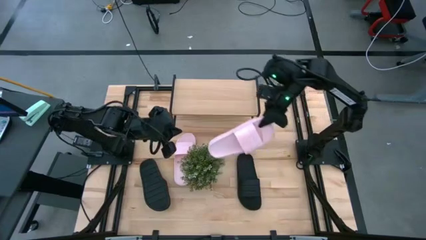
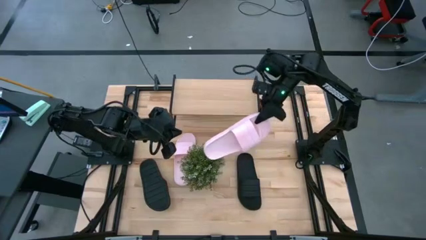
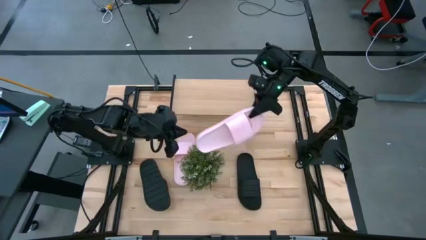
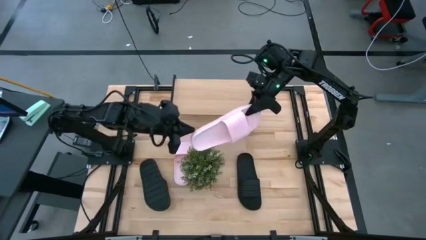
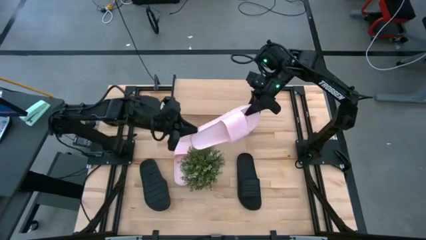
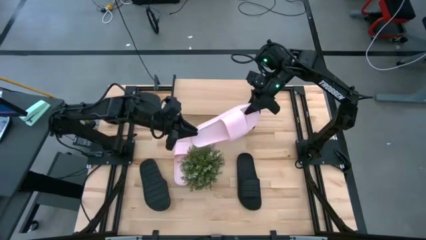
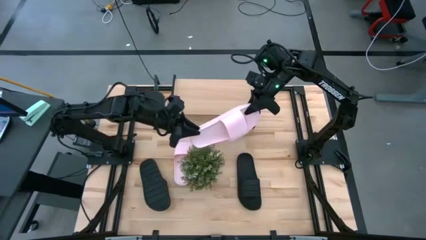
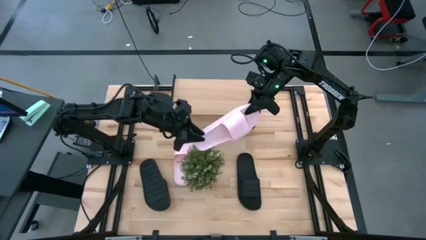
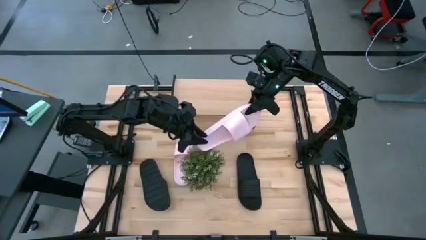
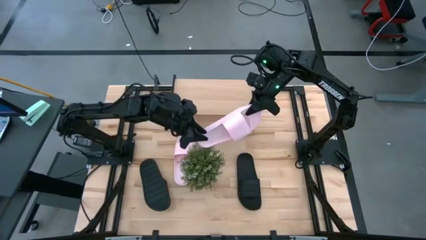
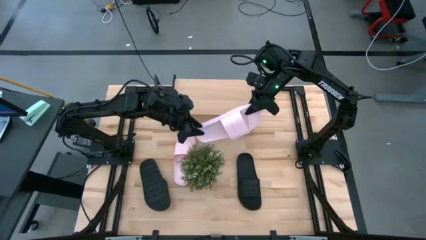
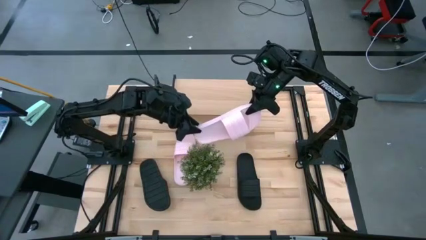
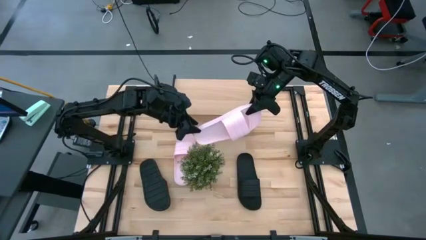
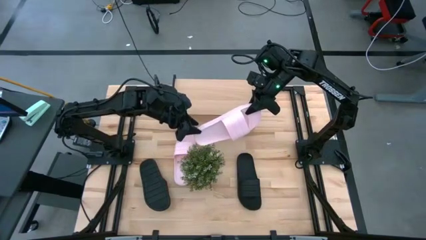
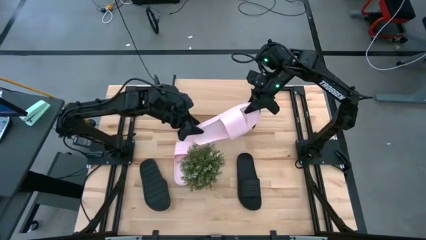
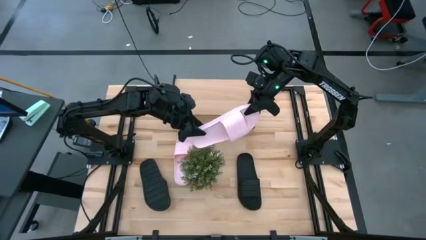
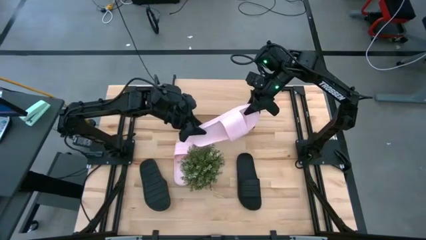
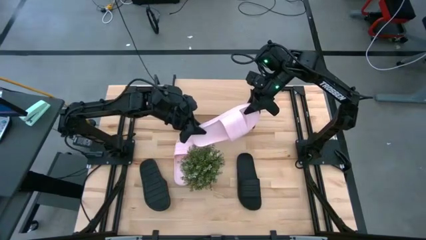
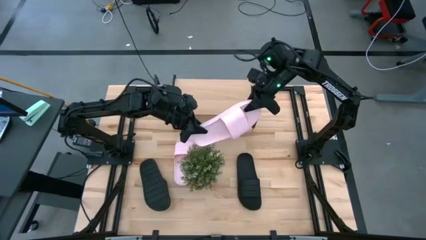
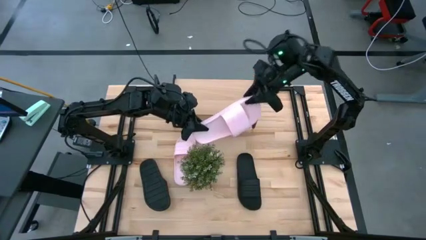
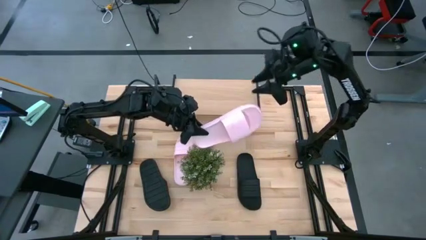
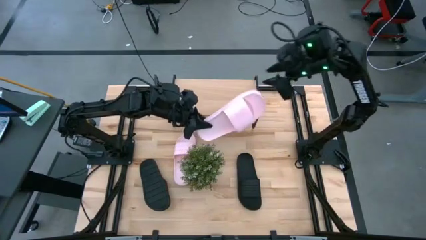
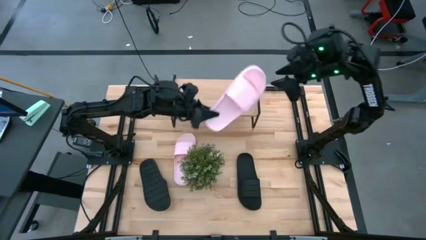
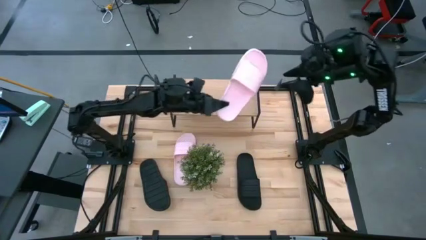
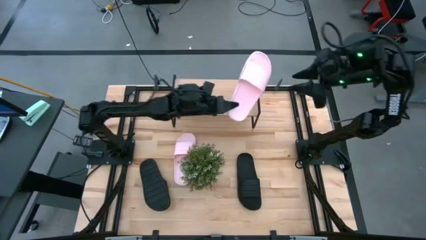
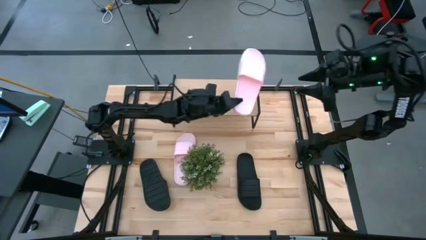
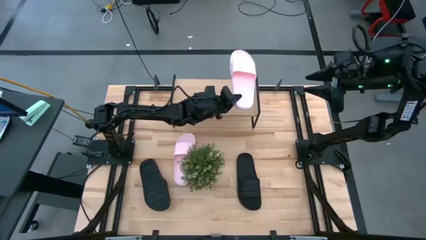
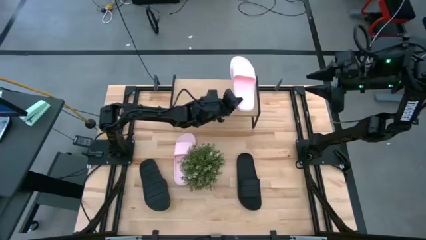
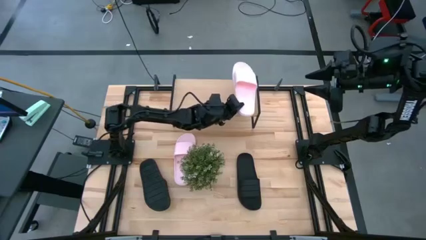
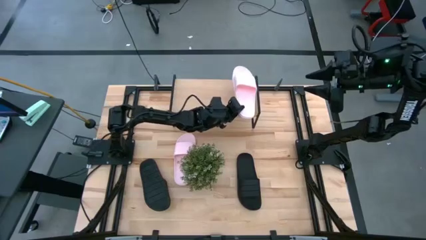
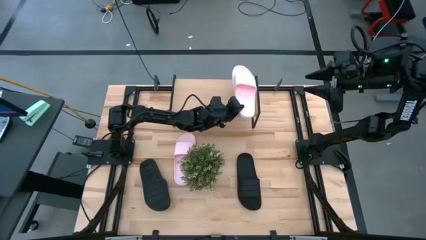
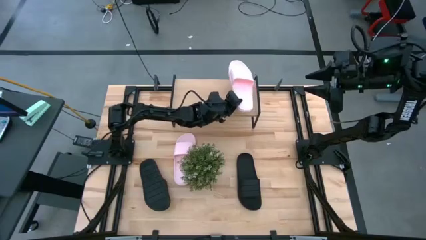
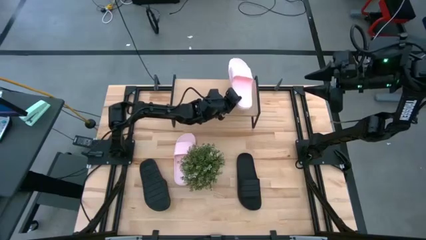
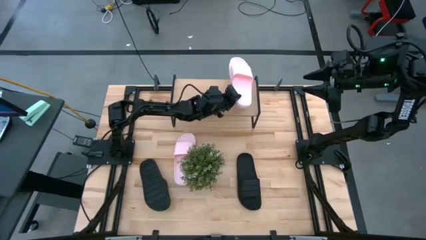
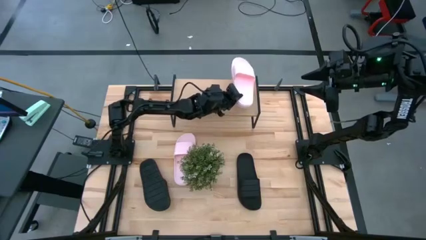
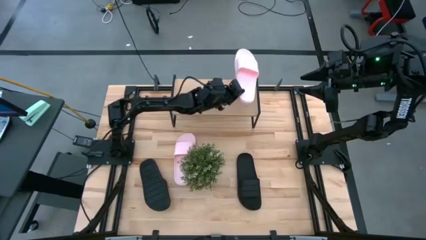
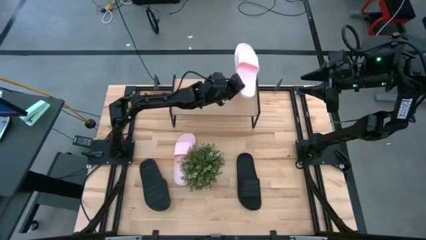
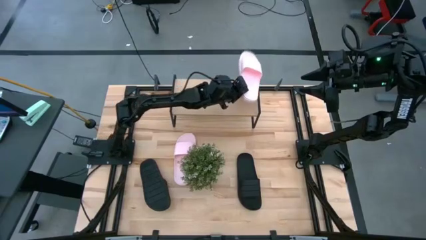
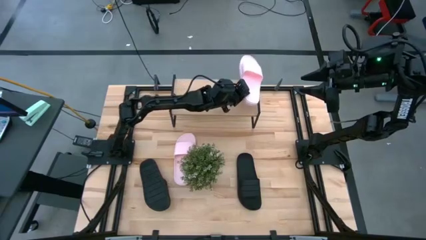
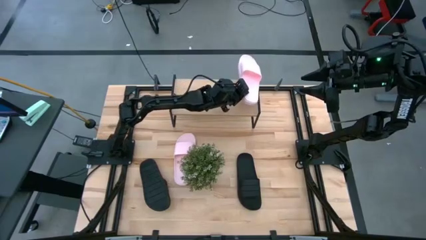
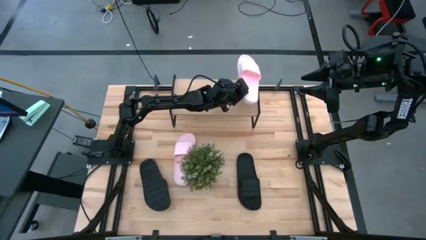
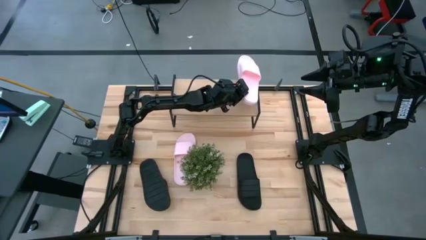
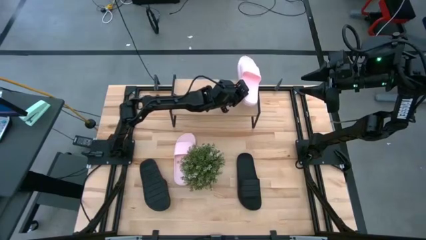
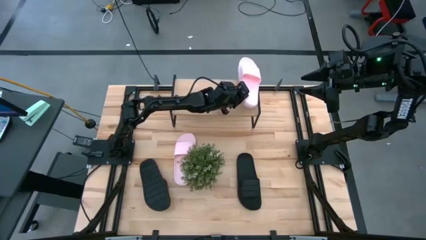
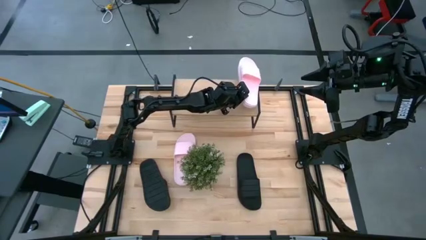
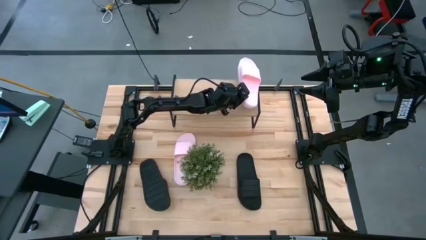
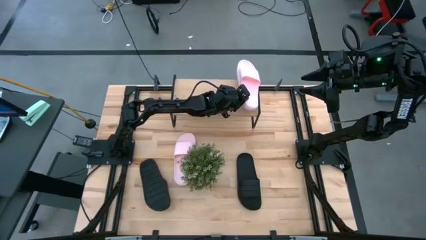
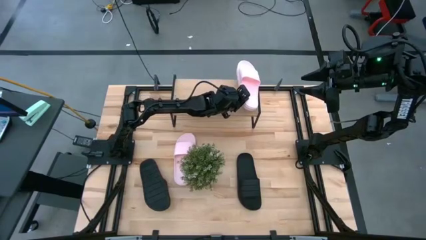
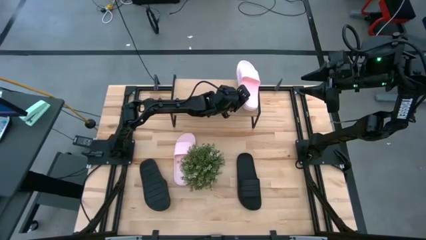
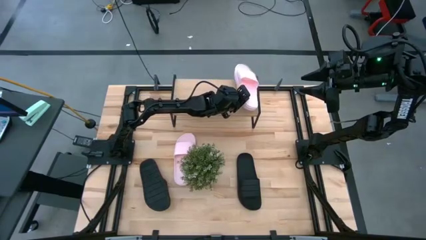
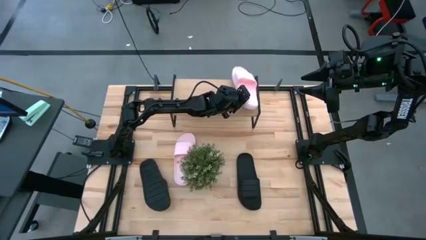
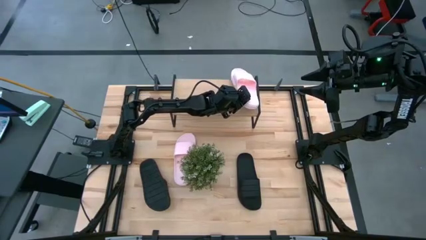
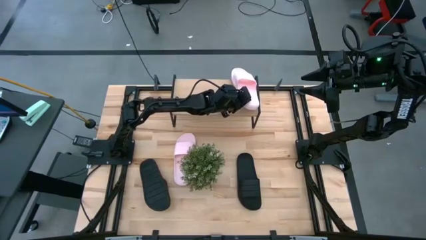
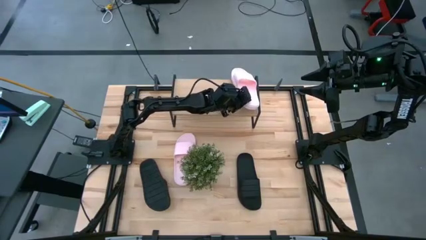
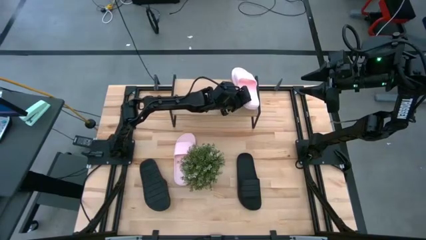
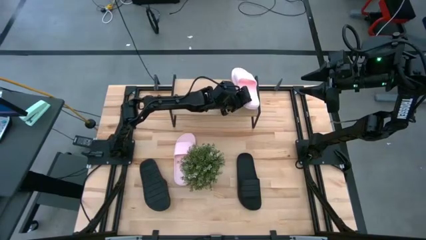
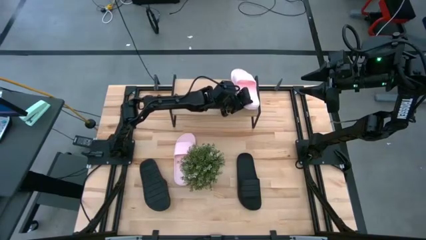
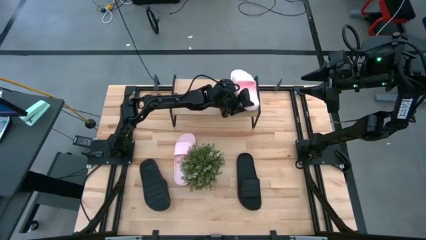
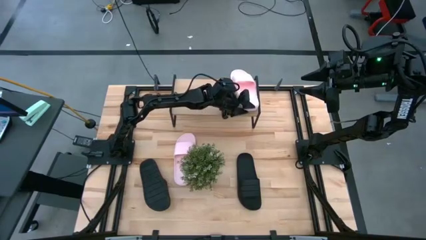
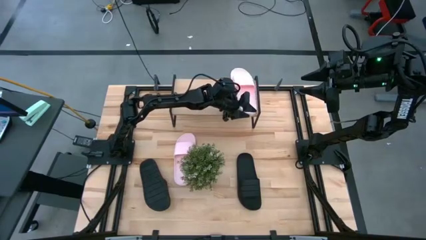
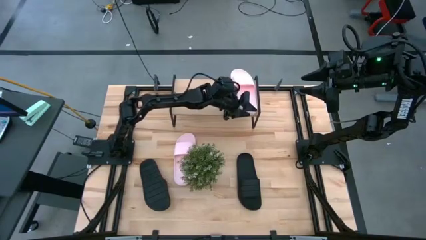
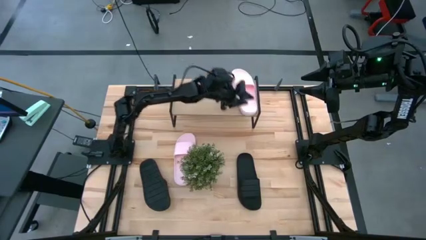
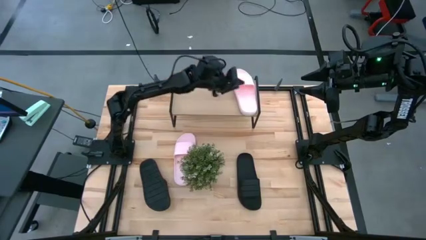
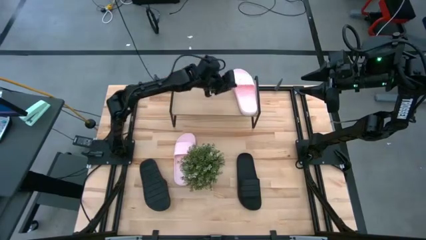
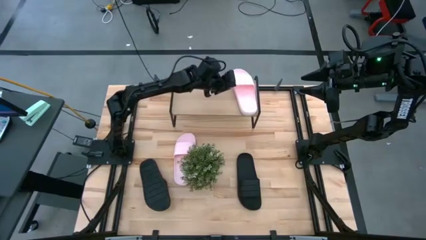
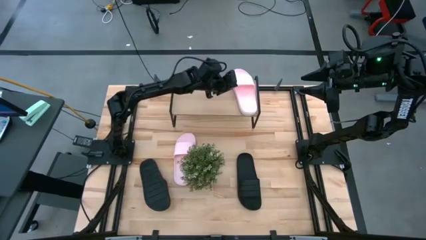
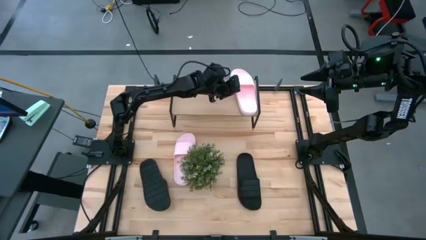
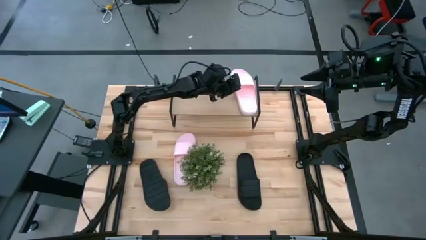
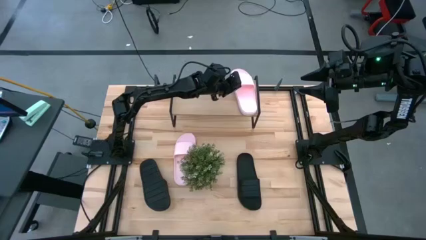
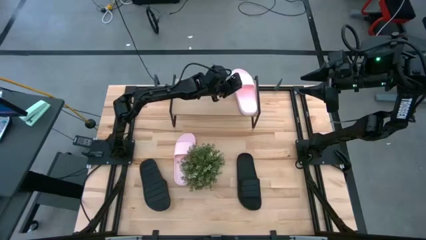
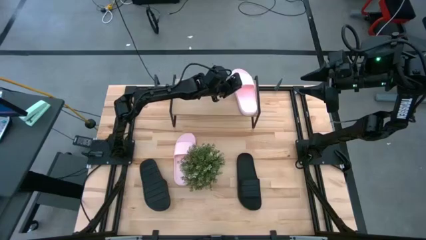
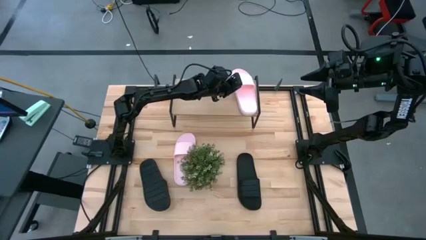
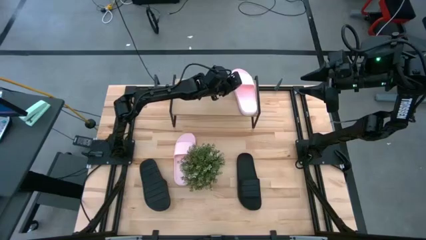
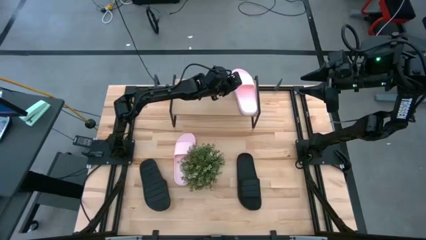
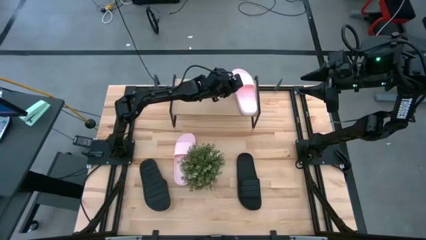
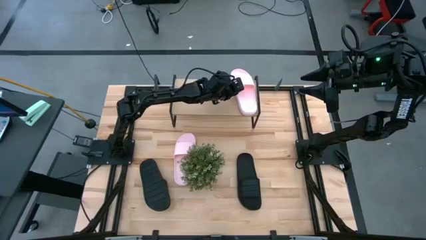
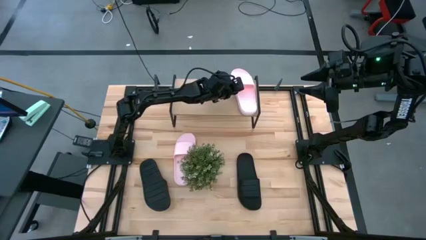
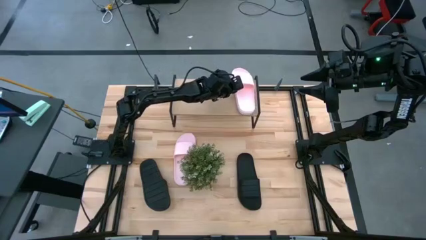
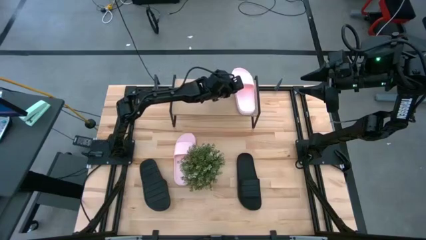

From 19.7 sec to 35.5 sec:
Task: Pick and place slides into the shelf
Put the right pink slipper on the shelf
